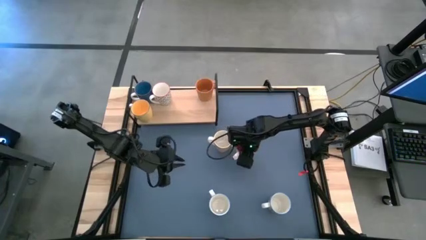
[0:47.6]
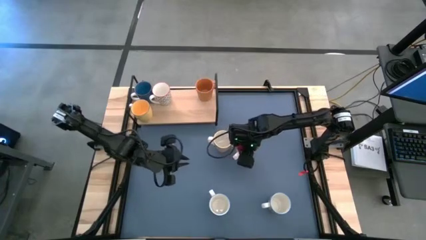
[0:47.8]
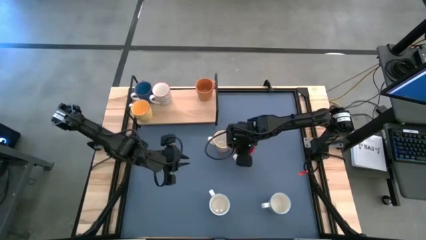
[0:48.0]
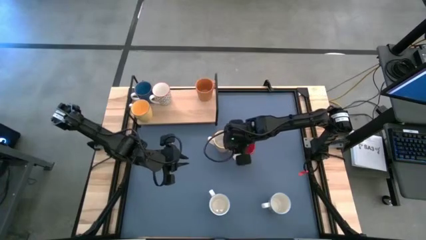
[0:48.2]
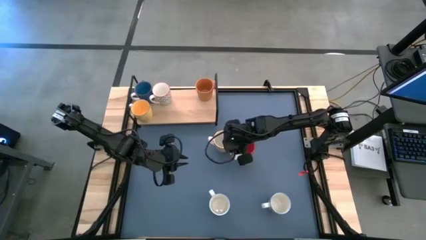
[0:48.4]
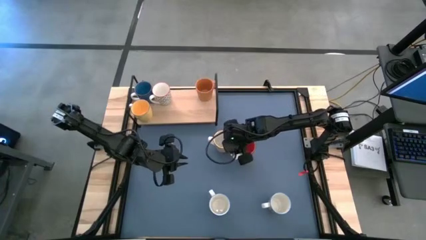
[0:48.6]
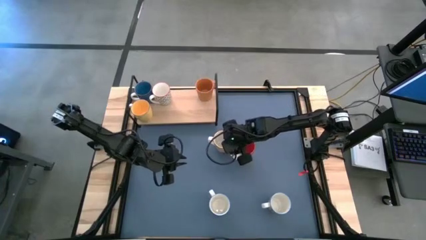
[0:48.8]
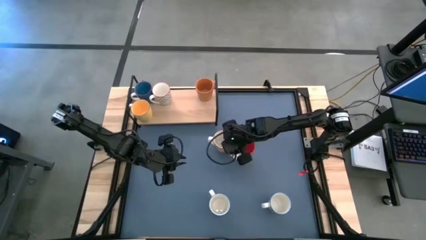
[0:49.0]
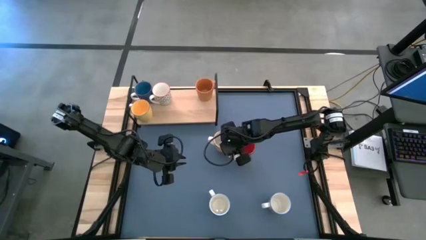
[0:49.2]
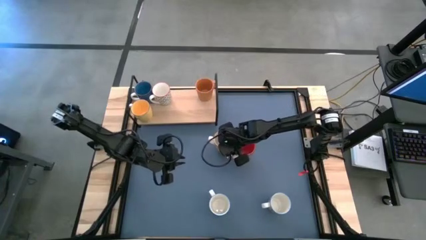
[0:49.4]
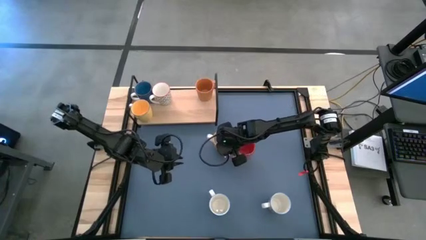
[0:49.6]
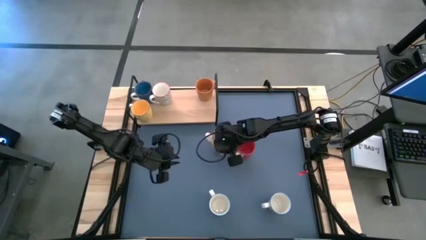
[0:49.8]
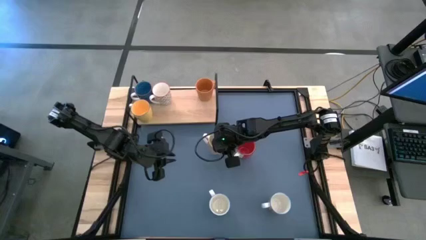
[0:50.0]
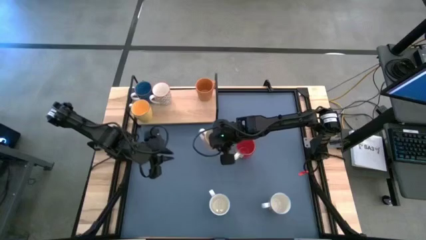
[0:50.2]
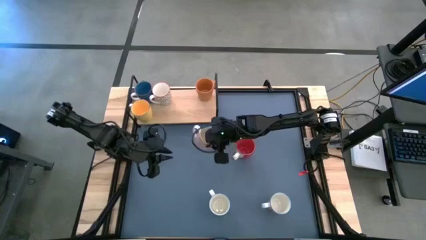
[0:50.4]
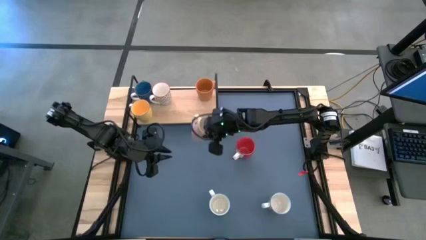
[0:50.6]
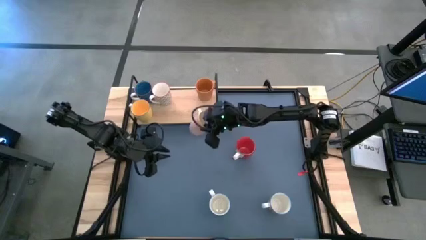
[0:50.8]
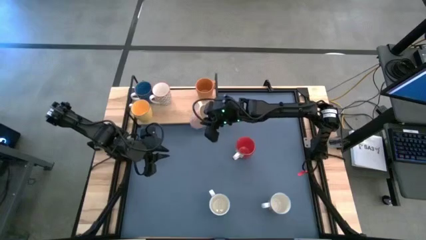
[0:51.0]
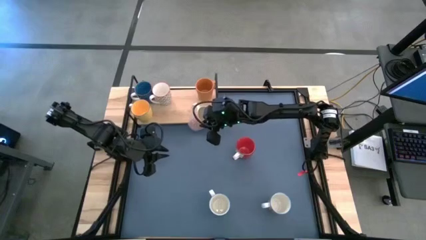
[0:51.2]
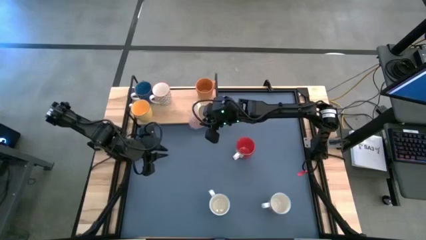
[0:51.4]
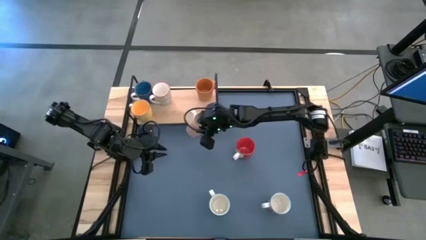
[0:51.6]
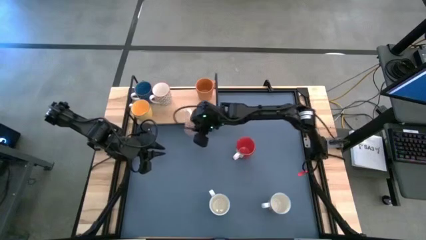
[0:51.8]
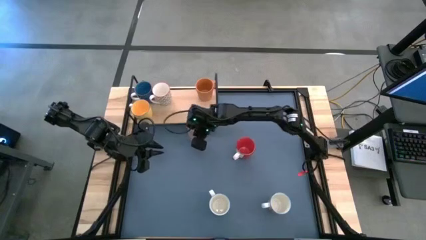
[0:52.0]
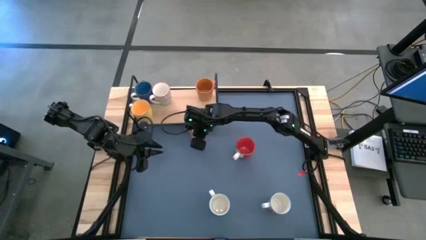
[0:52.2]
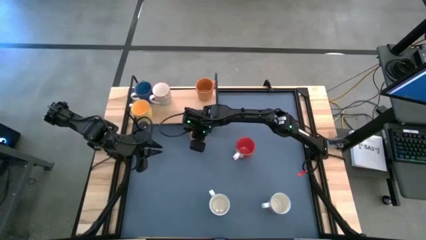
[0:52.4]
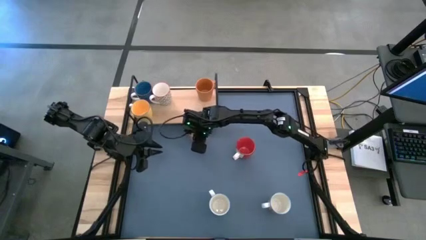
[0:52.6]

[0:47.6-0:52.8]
Task: Place coffee mugs
Move the brown patterned mug to the top left

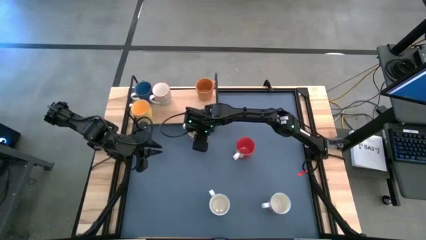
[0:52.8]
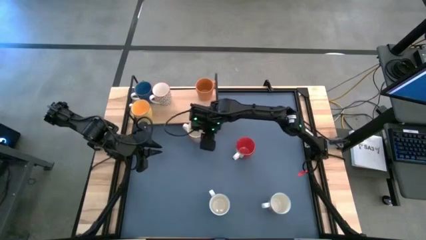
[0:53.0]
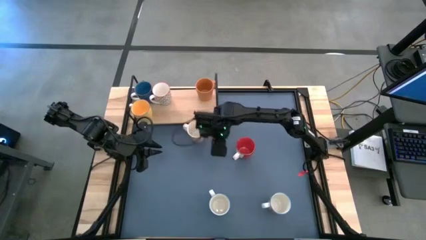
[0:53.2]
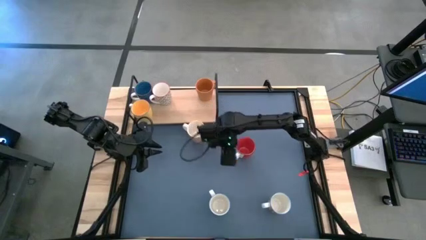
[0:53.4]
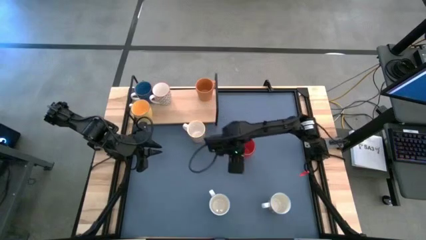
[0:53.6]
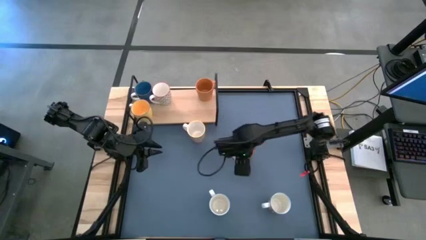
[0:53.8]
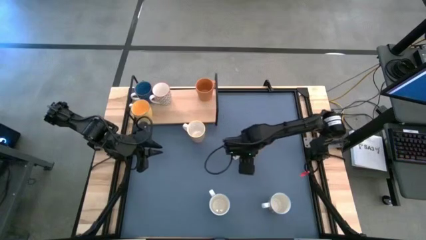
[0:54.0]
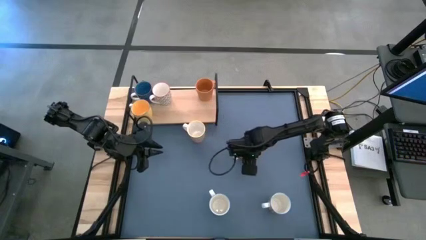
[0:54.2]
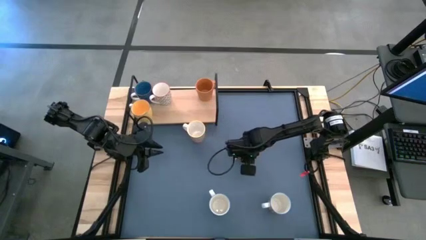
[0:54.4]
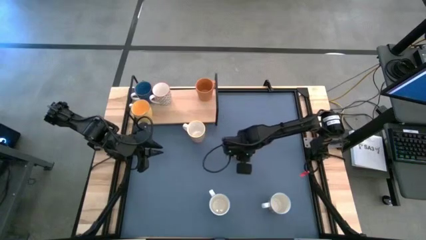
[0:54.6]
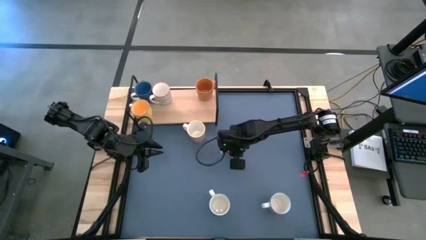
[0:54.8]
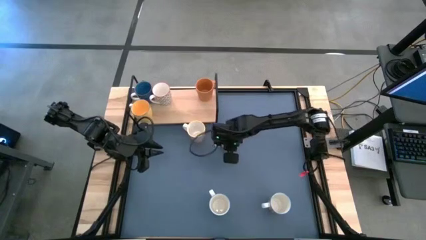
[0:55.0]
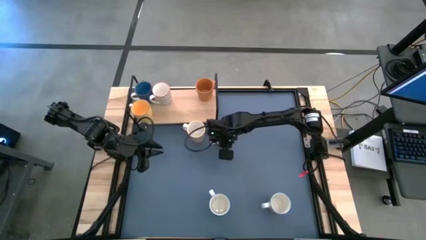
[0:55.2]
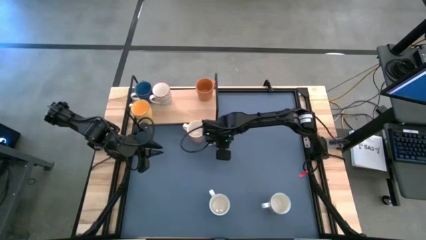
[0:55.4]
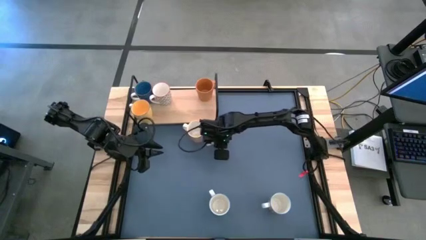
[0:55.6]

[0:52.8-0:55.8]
Move the red mug right to the top

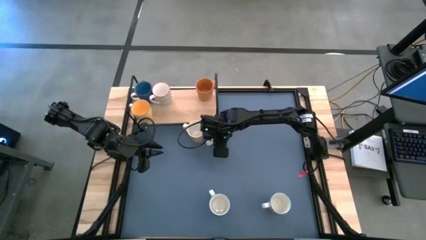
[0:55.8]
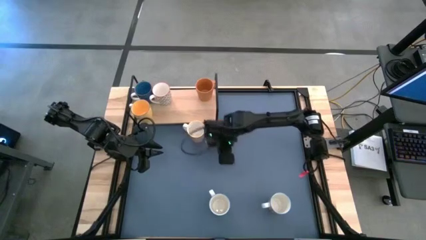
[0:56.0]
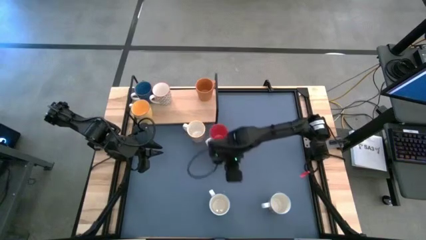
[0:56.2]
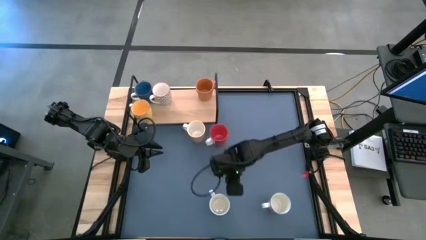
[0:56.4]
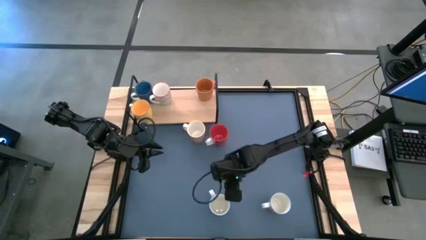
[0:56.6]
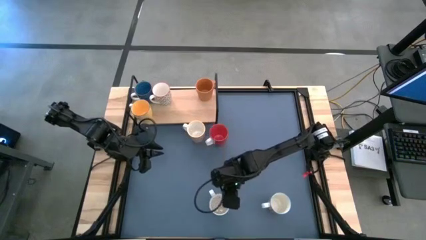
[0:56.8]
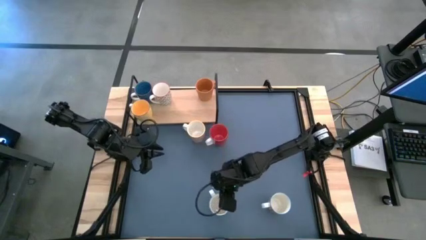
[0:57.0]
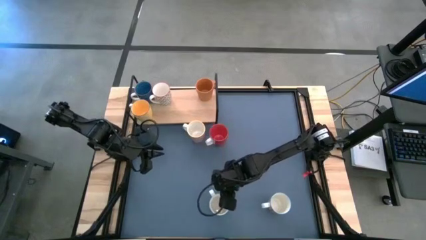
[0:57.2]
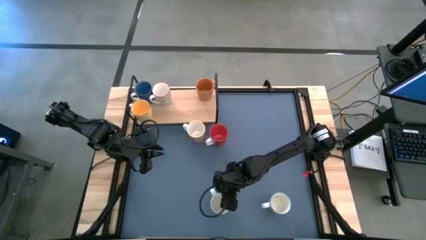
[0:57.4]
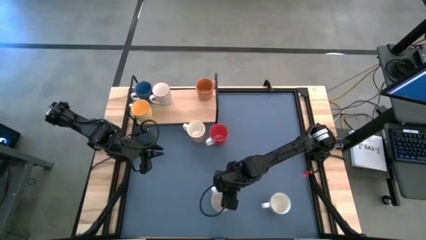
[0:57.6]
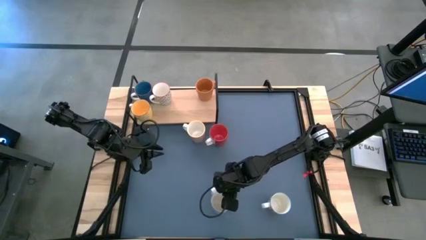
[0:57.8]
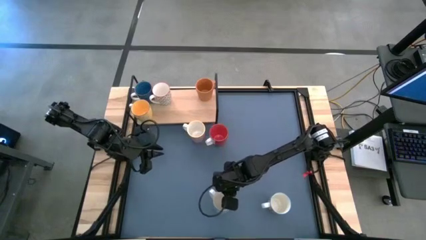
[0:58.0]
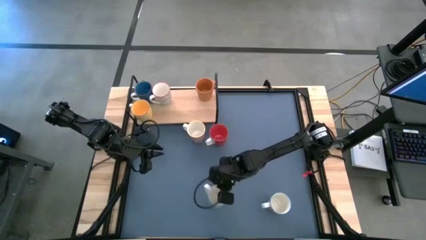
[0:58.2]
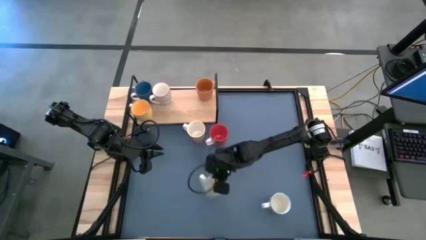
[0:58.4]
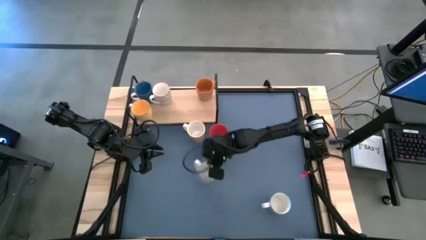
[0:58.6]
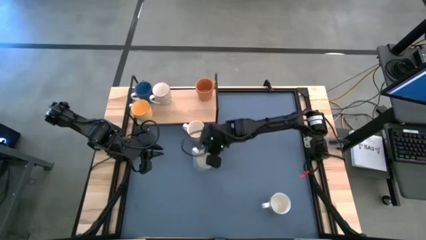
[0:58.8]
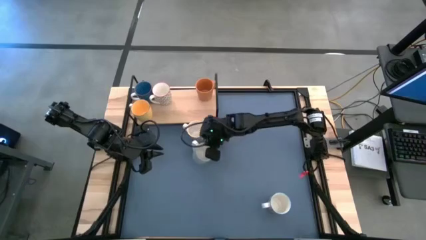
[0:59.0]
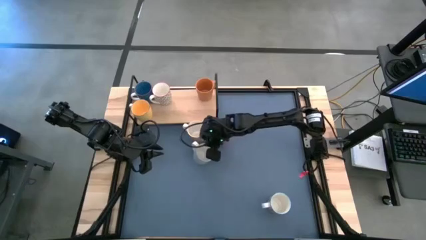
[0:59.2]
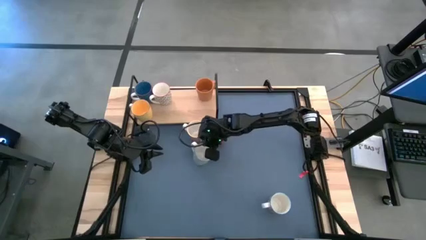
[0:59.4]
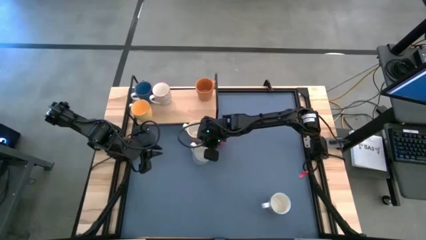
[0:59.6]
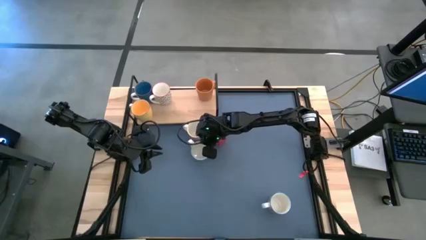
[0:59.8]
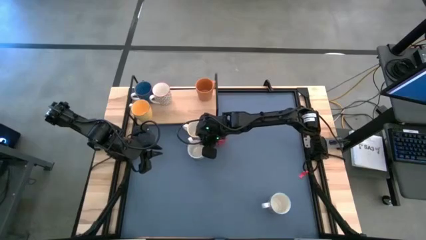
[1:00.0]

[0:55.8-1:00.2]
Move the green patterned mug to the middle

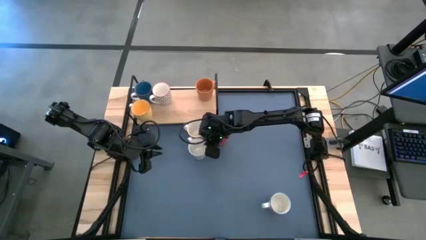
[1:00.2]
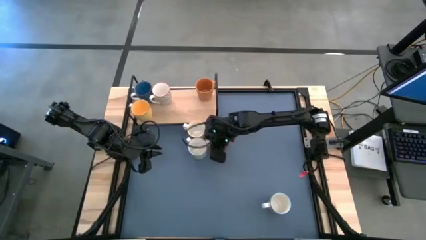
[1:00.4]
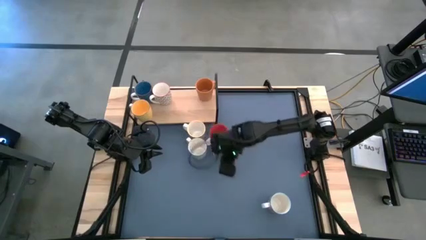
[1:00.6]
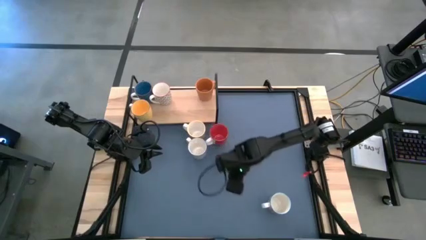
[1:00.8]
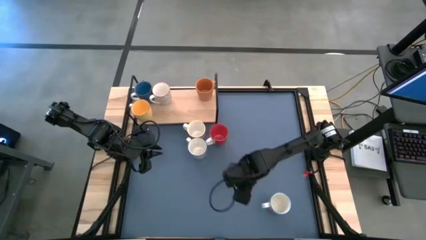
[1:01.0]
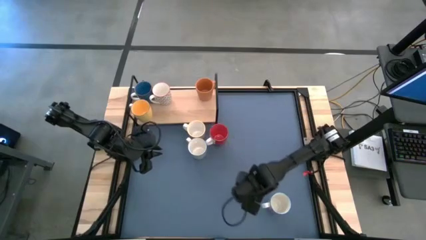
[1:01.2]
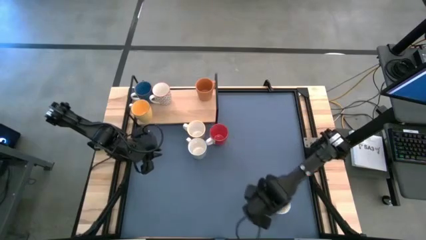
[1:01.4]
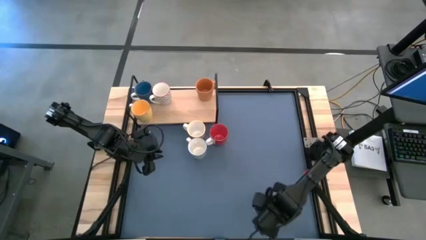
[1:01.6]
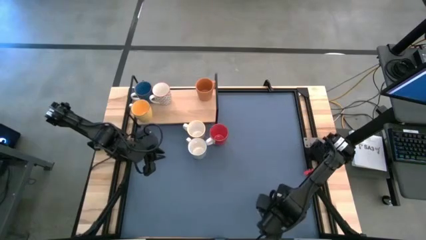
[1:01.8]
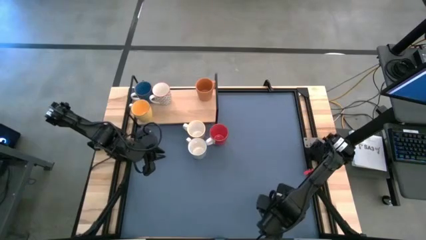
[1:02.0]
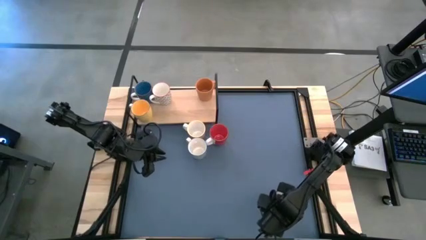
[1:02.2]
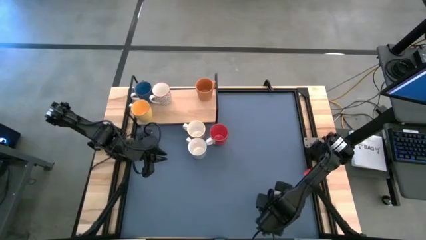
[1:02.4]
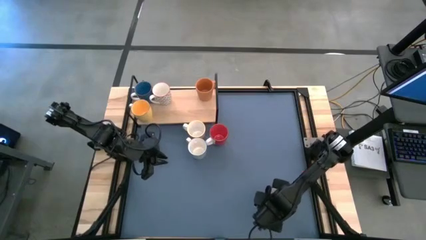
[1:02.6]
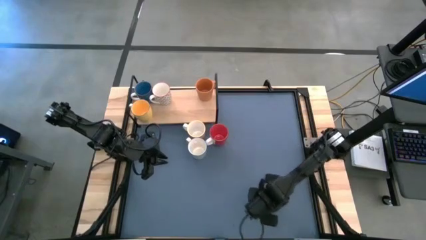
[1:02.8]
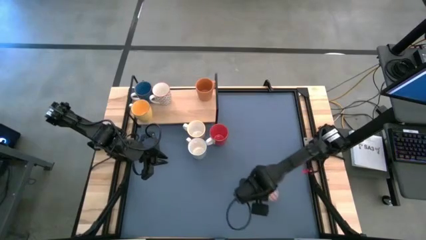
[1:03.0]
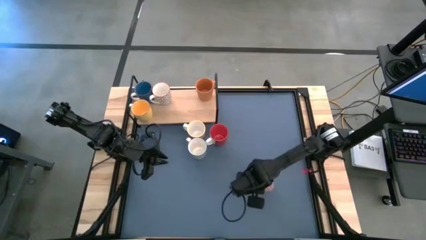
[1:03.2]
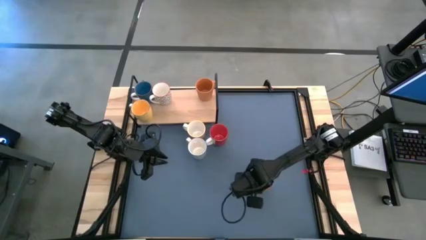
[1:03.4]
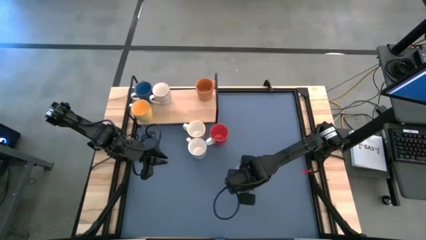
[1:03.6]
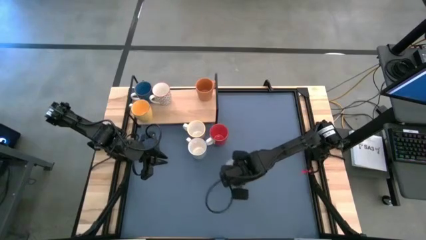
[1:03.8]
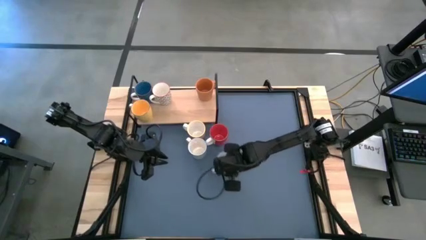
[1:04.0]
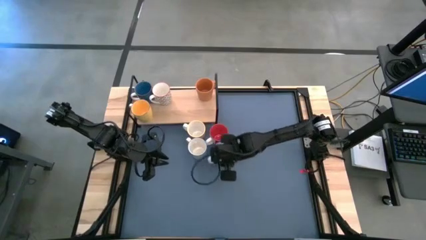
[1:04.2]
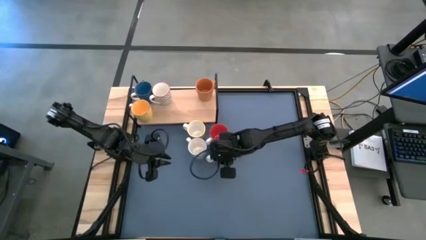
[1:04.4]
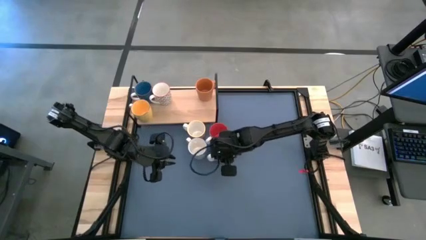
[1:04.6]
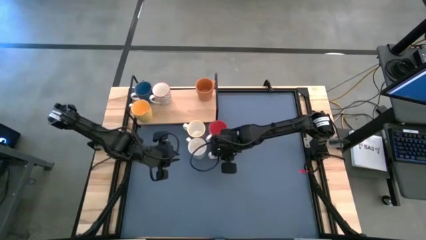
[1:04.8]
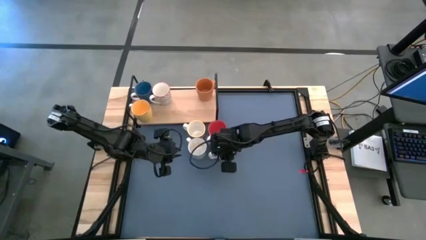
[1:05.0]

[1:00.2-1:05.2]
Move the red patterned mug to the middle
